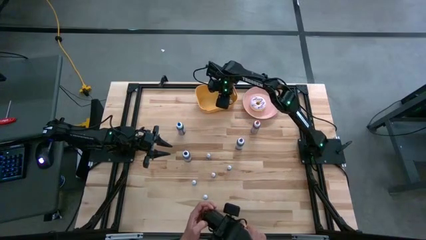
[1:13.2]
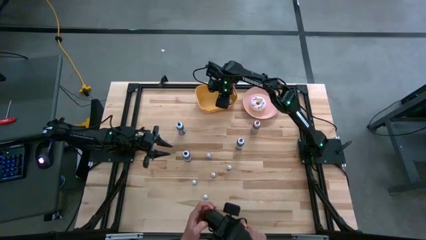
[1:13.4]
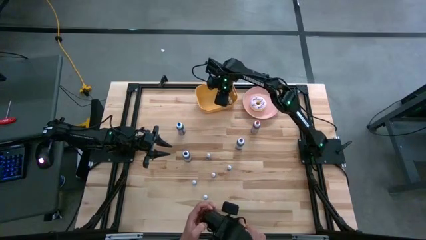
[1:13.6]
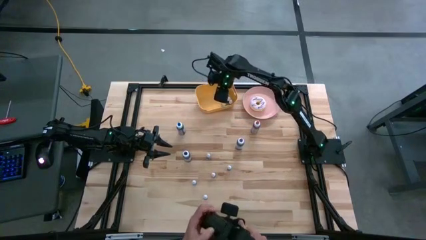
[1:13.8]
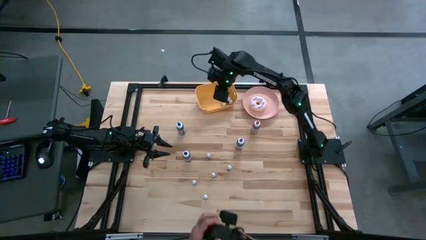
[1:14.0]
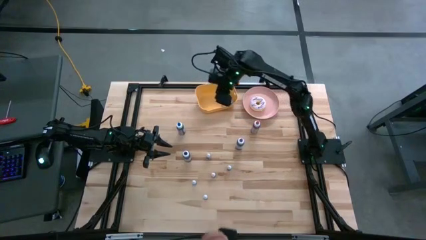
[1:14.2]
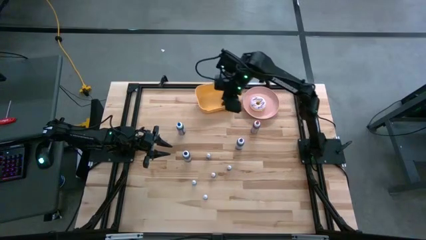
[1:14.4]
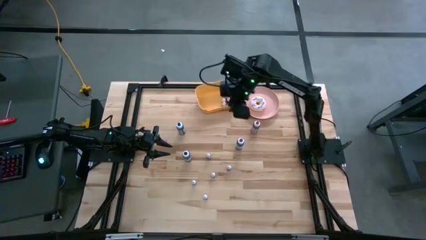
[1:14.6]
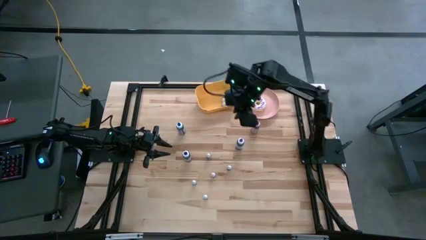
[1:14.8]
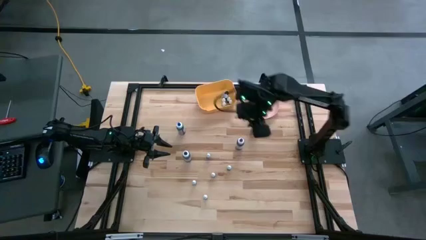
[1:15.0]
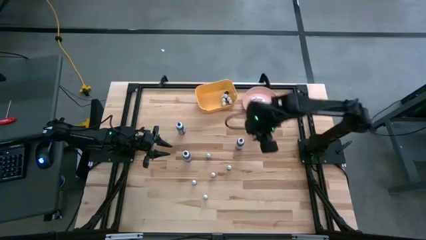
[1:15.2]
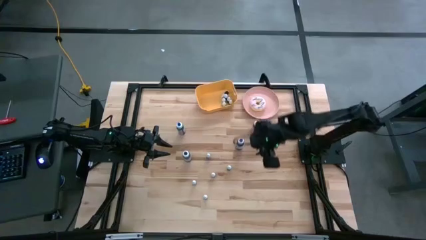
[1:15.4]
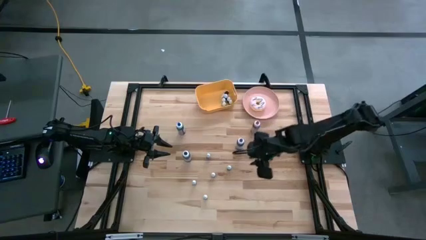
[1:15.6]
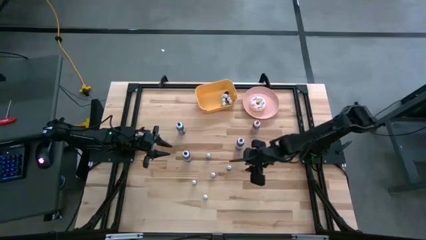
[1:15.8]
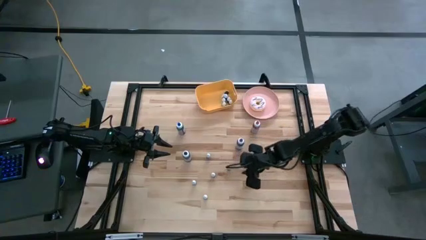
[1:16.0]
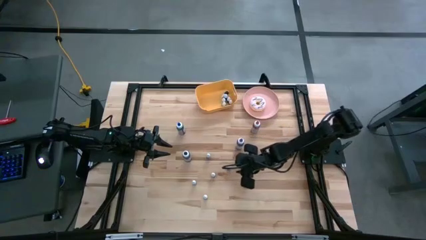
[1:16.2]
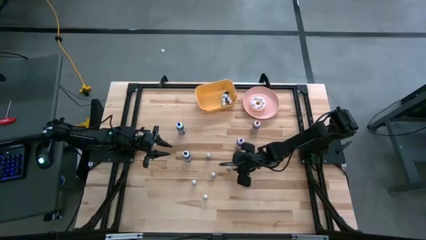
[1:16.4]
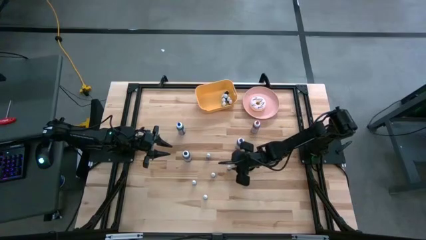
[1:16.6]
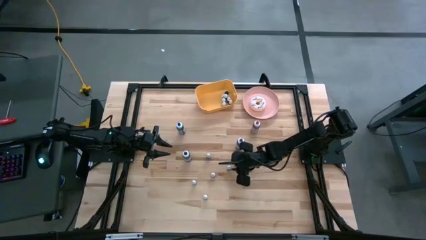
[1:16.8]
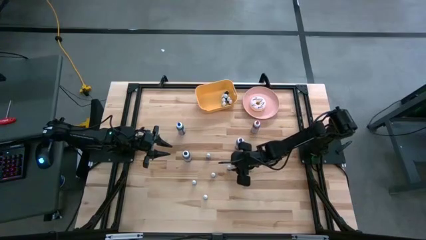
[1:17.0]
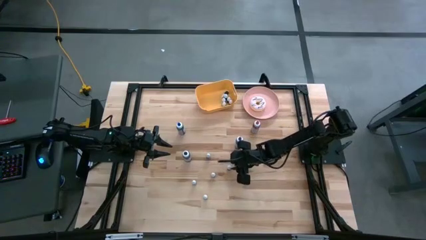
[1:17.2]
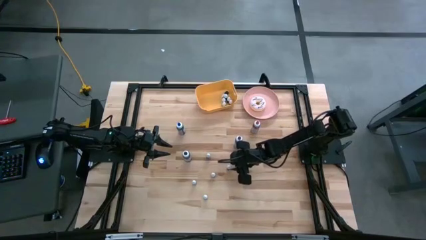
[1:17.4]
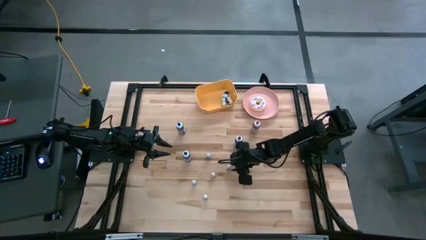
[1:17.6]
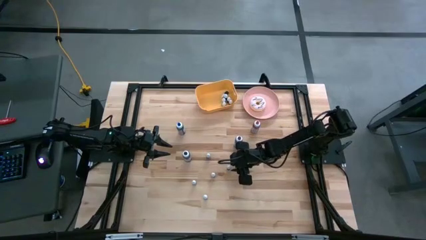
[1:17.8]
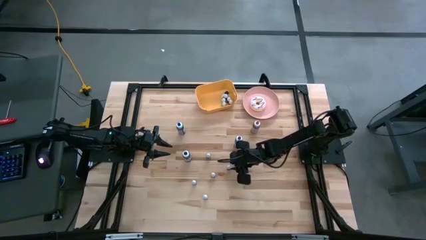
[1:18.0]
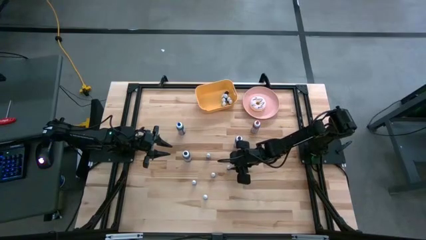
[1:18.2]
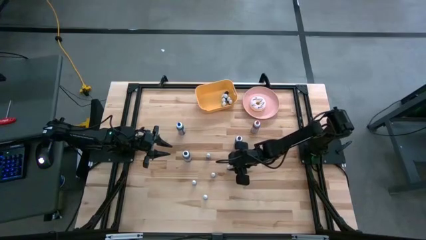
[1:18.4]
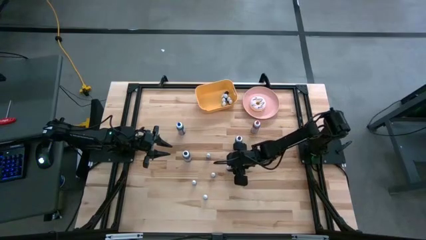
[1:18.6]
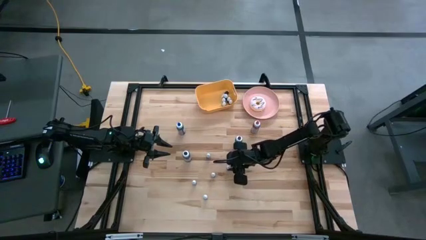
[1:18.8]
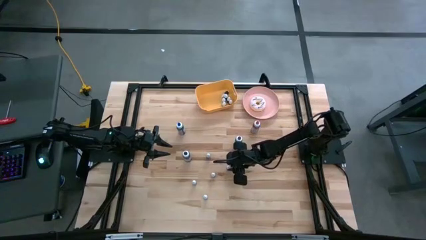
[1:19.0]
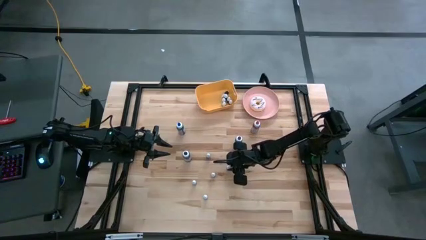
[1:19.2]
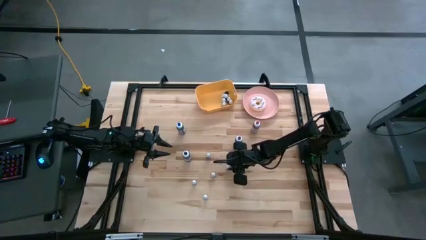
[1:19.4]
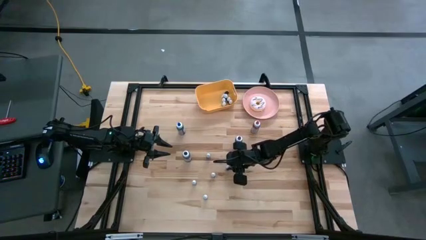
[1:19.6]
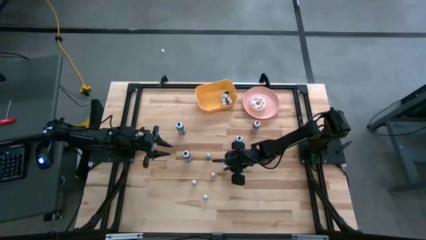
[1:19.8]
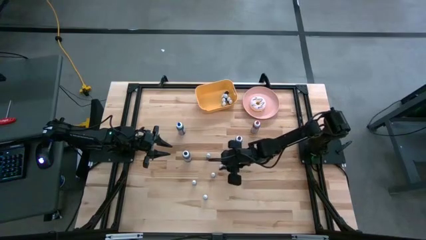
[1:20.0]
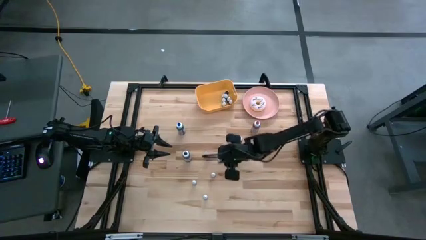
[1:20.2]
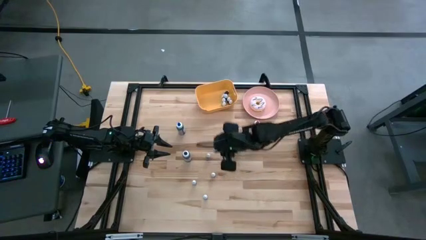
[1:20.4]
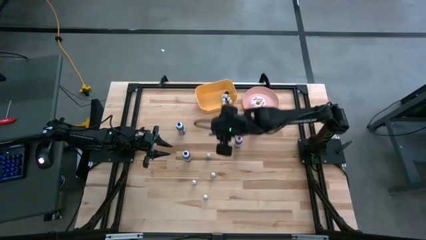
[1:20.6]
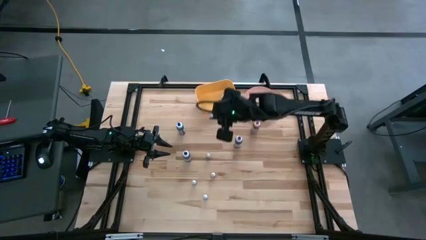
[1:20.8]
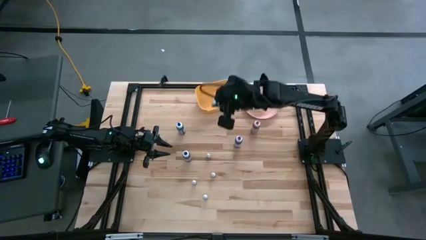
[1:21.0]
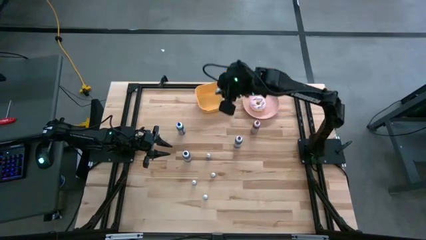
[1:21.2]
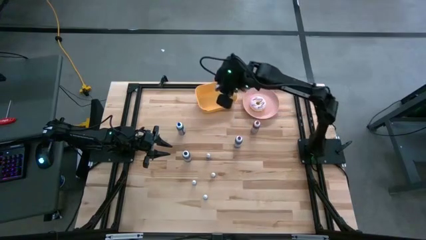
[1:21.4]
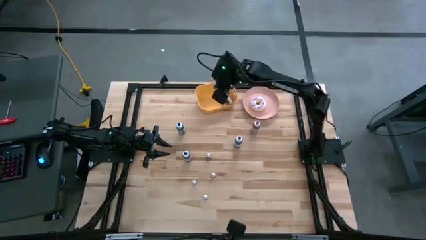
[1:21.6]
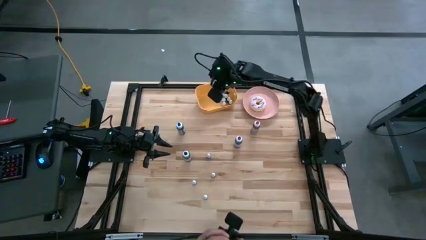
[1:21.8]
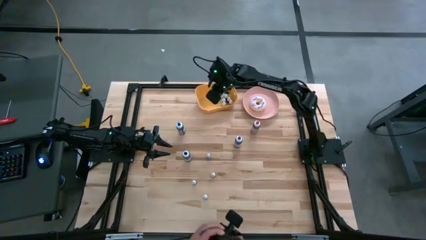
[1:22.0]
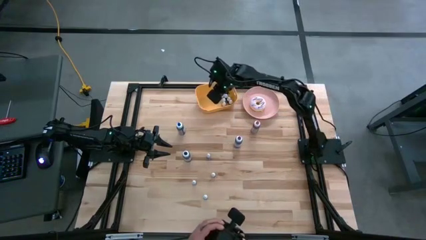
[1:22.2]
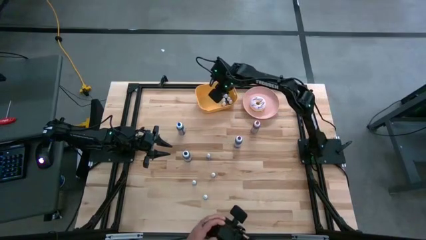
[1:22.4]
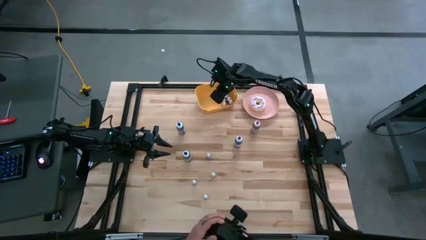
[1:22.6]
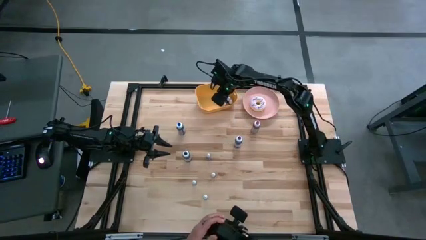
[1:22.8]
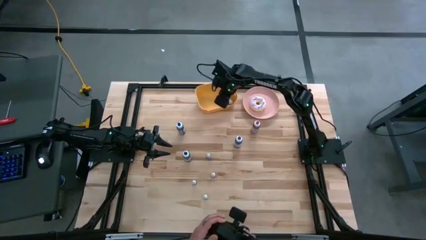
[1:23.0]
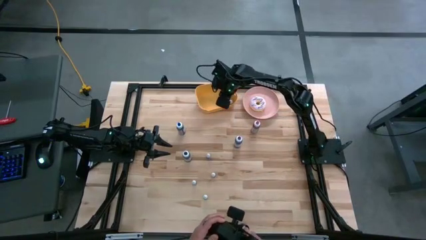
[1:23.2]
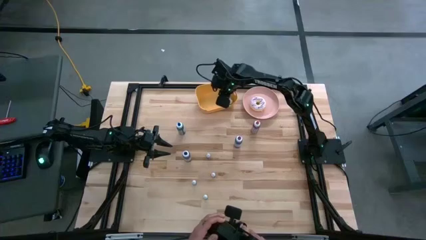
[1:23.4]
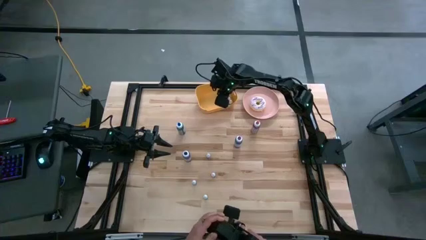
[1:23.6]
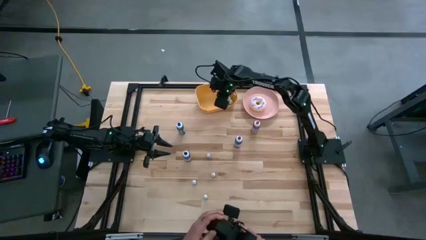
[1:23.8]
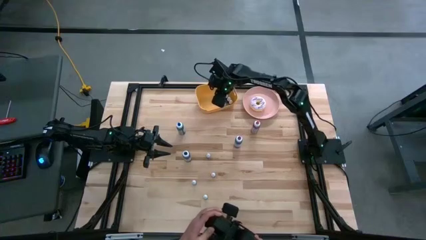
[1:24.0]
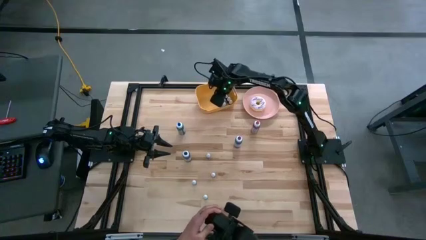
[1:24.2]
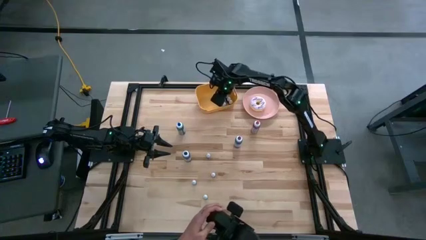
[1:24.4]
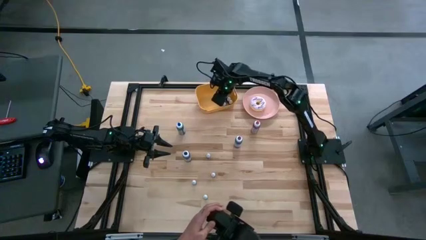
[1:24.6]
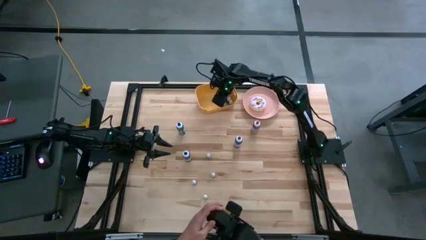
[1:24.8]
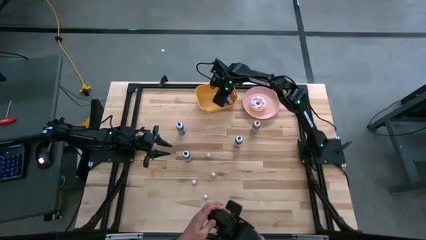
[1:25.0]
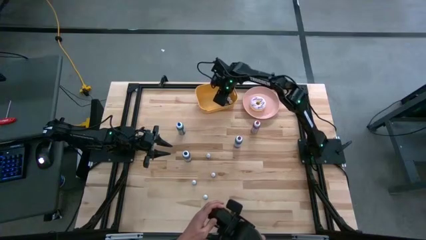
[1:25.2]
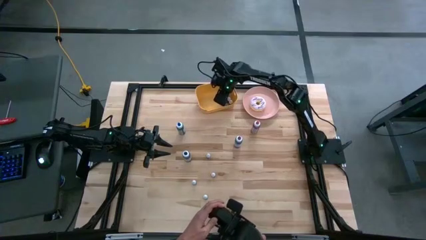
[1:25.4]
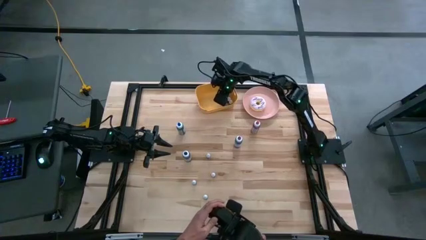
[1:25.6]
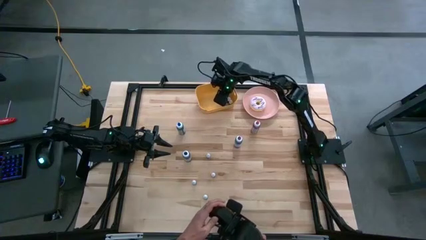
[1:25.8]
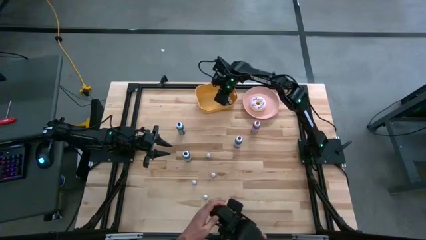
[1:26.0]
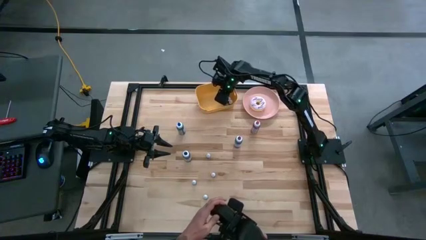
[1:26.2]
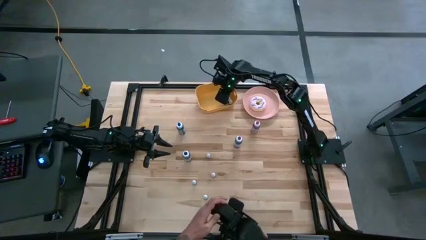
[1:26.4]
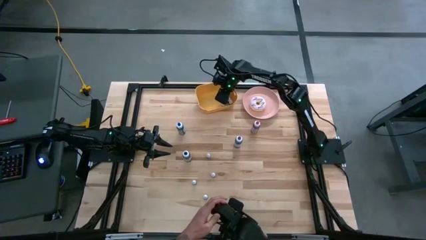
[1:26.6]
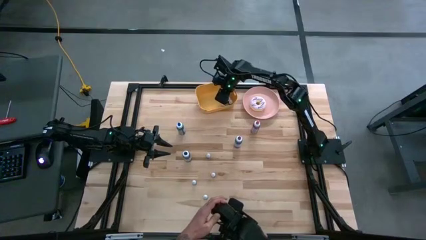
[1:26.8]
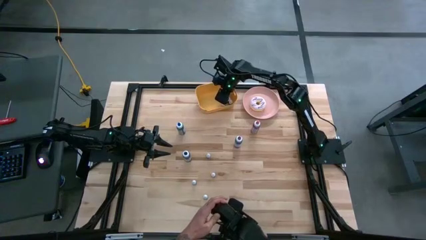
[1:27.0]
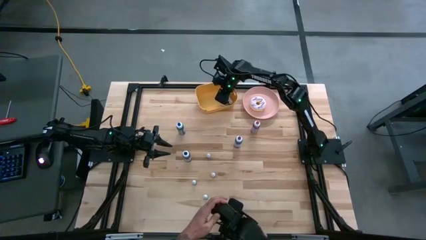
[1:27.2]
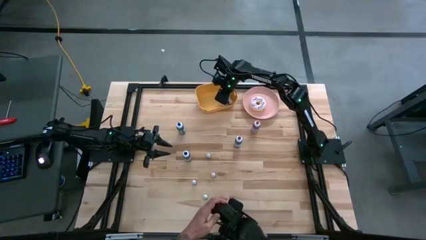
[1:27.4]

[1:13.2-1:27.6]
Task: Pick & Place food coloring
Put the small green food coloring bottle into the yellow bin

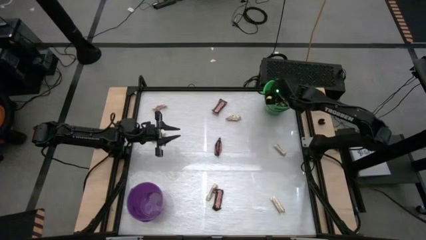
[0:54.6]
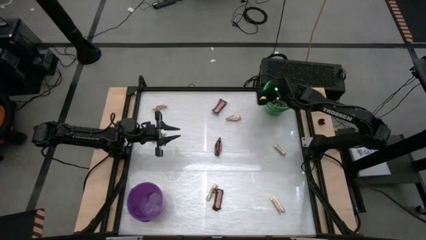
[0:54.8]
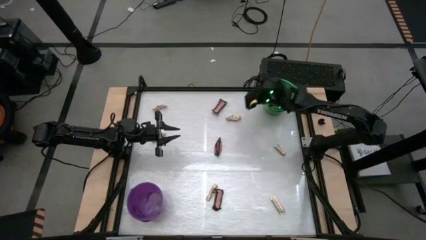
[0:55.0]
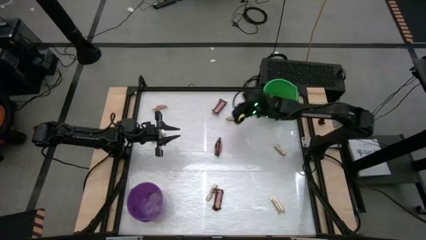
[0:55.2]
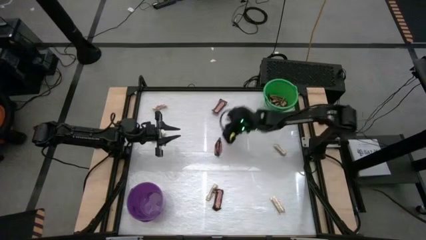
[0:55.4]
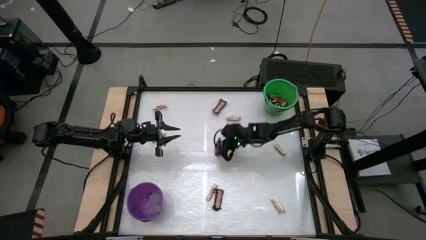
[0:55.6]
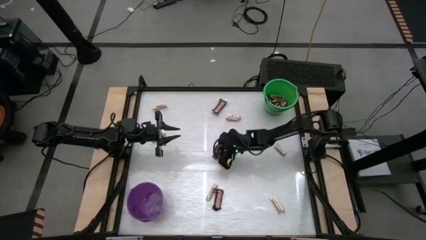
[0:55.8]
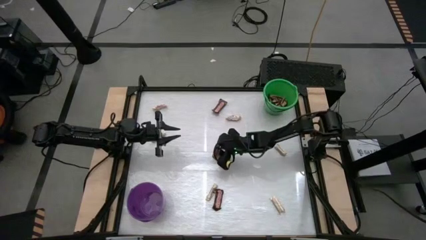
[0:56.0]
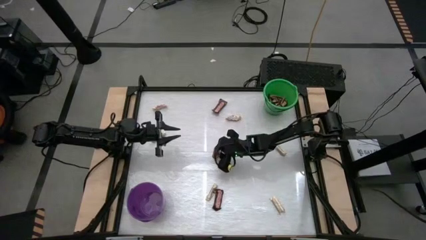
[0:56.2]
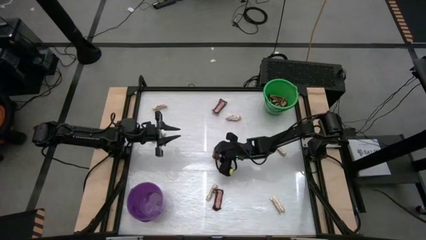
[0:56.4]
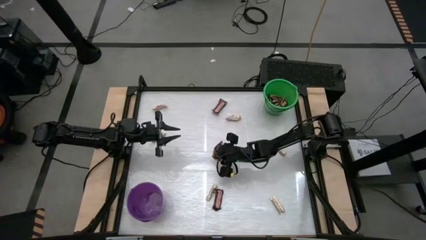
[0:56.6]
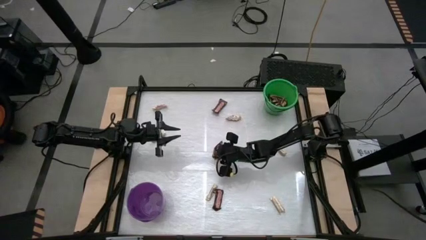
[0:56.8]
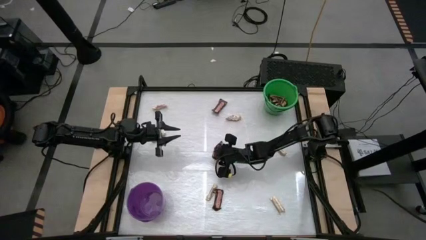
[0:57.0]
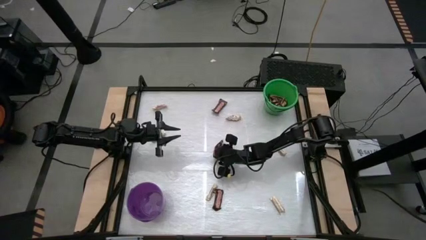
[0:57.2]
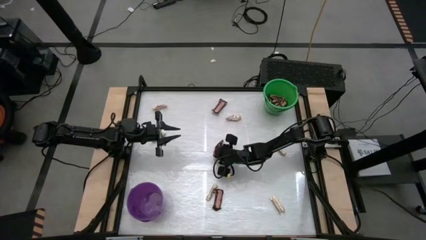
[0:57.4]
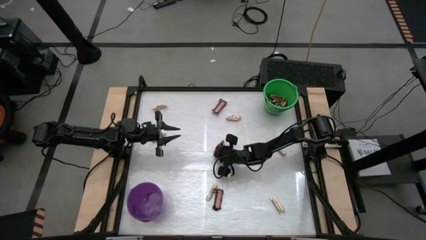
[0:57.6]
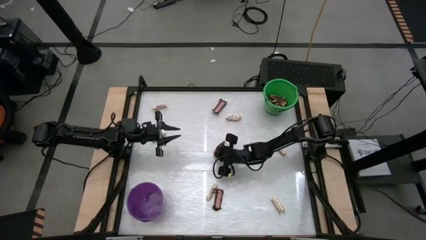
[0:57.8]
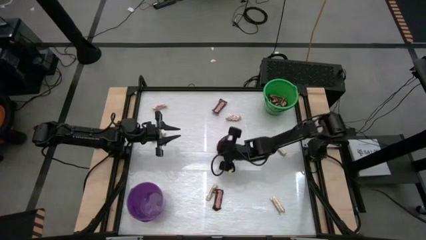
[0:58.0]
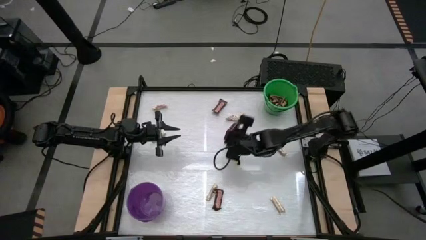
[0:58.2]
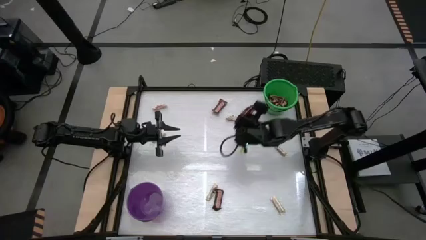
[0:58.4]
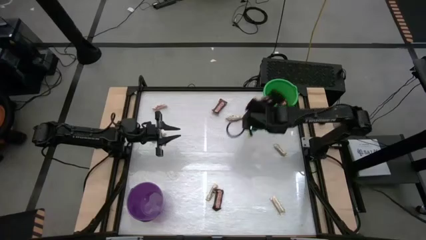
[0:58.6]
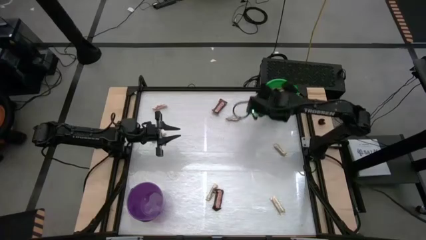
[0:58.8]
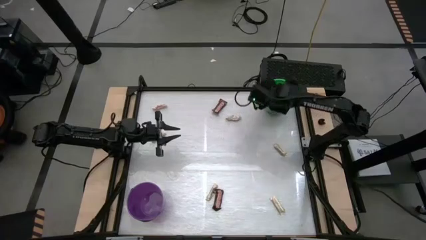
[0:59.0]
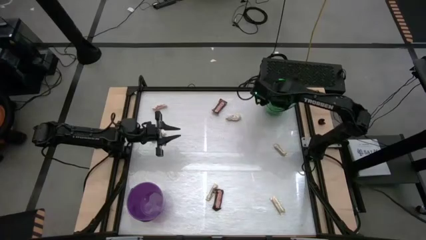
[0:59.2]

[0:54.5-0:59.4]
Task: Sort candy by brand, put in halloween buckets
Put the brown candy bar into the green bucket
